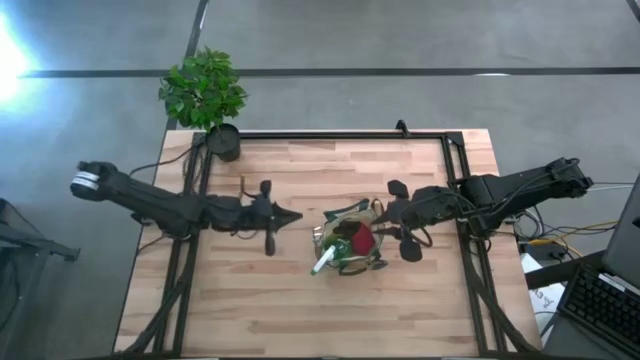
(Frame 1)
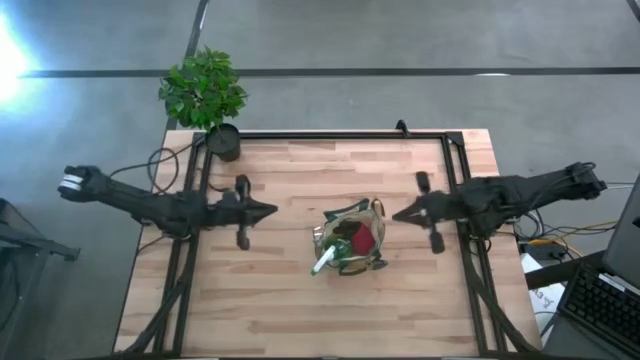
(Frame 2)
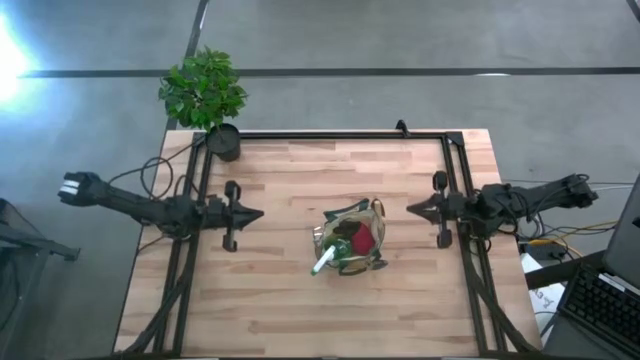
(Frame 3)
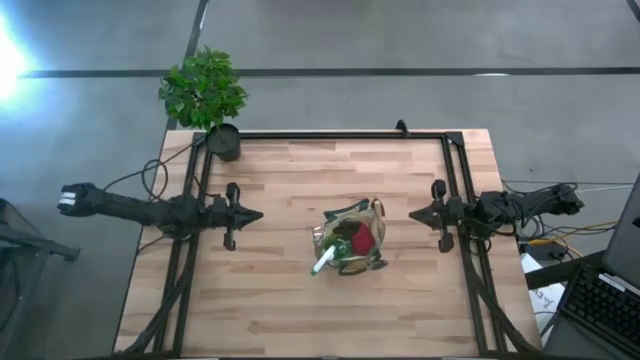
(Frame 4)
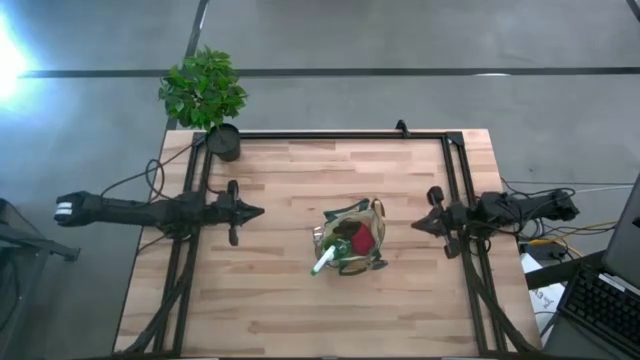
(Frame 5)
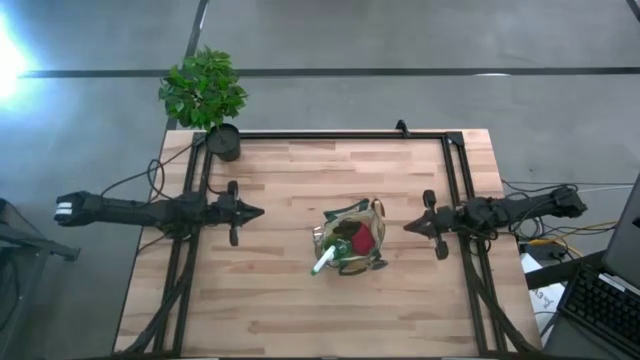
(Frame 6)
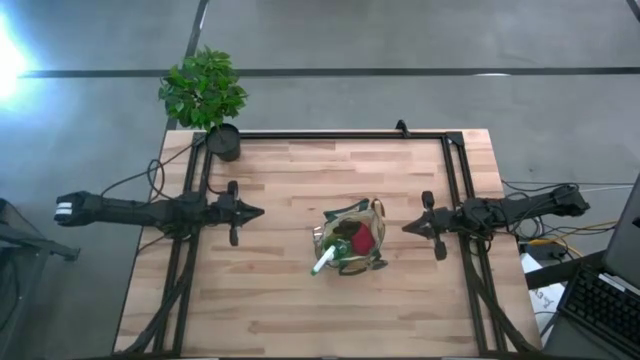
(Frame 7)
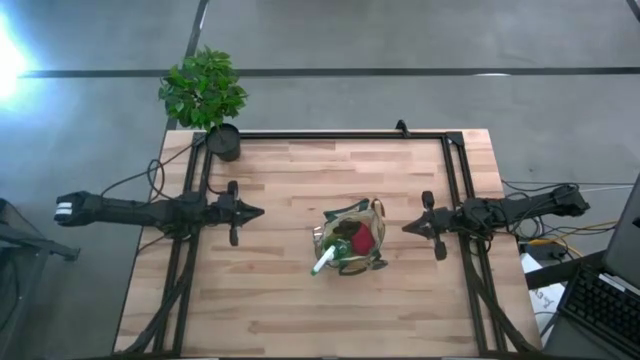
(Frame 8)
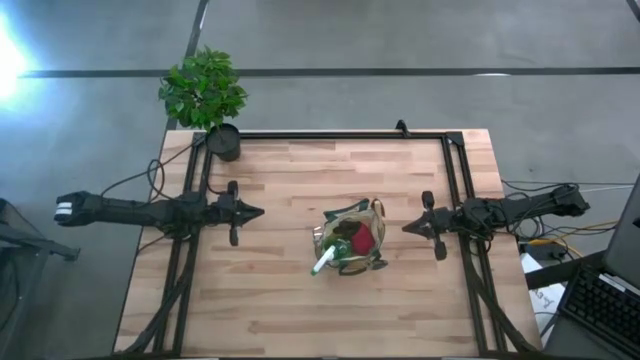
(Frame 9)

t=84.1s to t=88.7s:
Task: Pick & Place Garden tools in Gardening bag
Return to Home Position

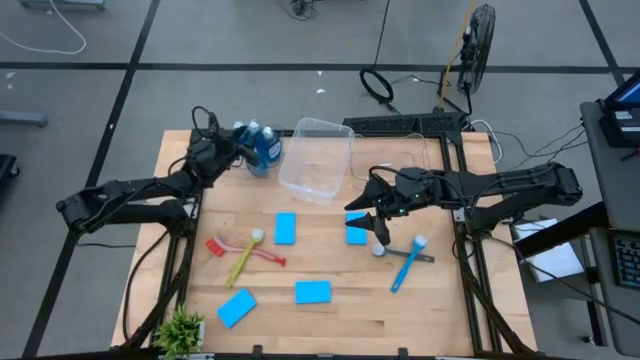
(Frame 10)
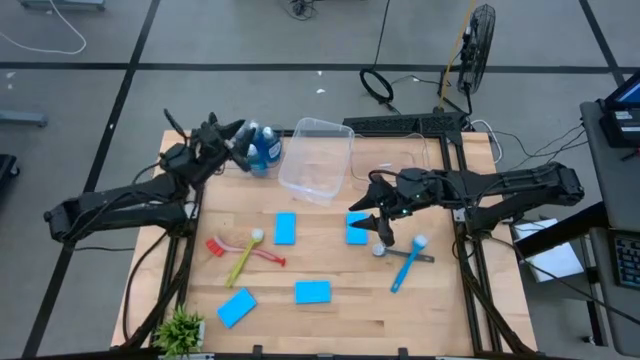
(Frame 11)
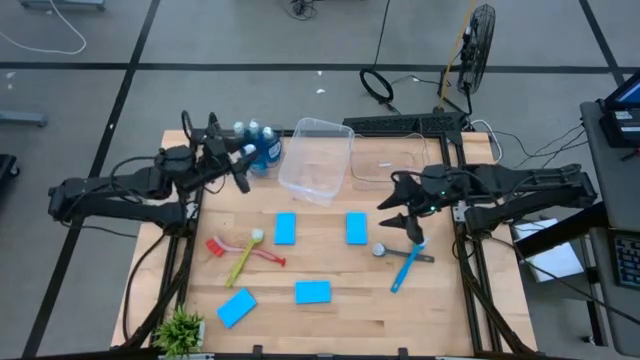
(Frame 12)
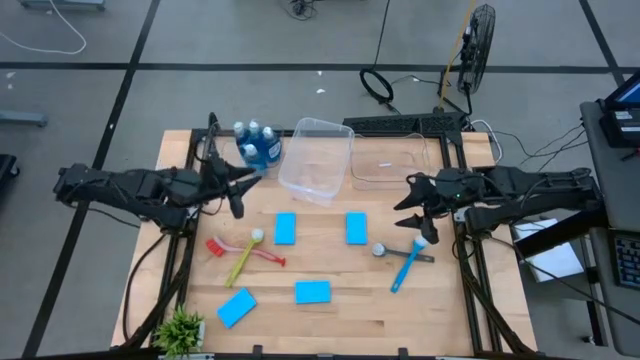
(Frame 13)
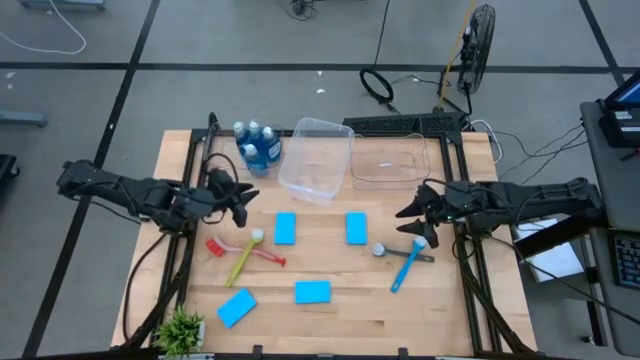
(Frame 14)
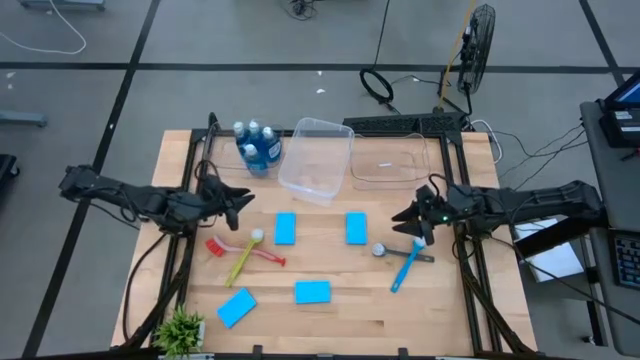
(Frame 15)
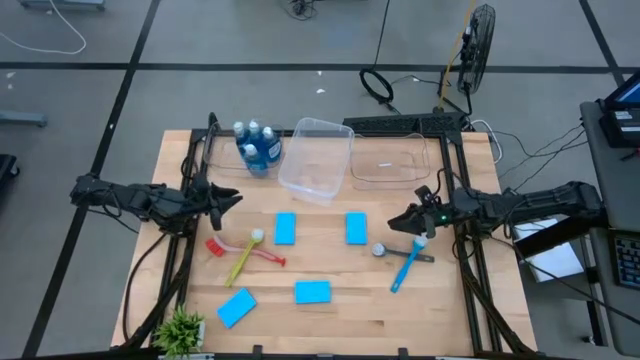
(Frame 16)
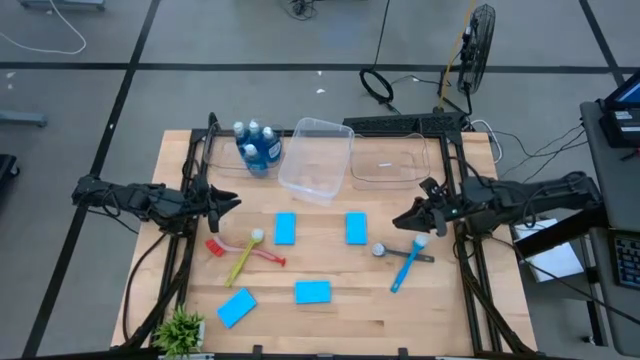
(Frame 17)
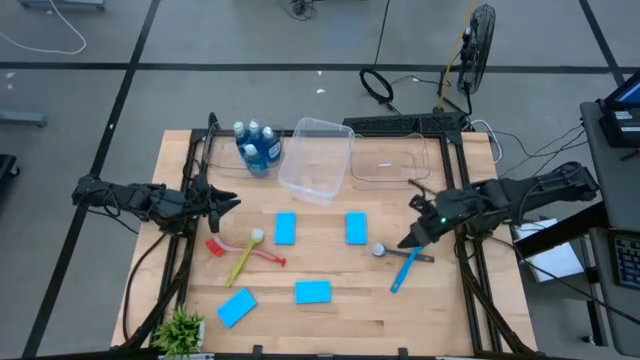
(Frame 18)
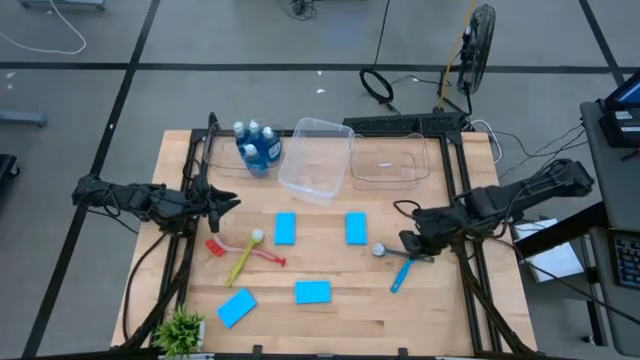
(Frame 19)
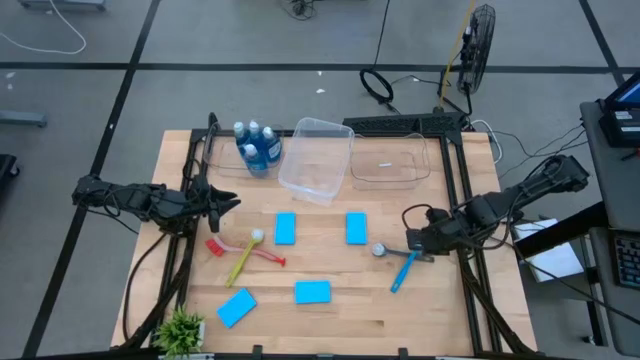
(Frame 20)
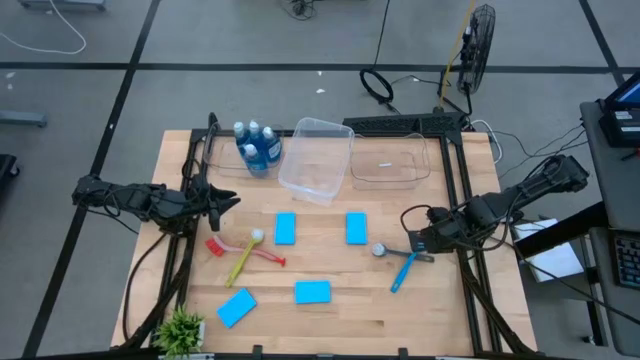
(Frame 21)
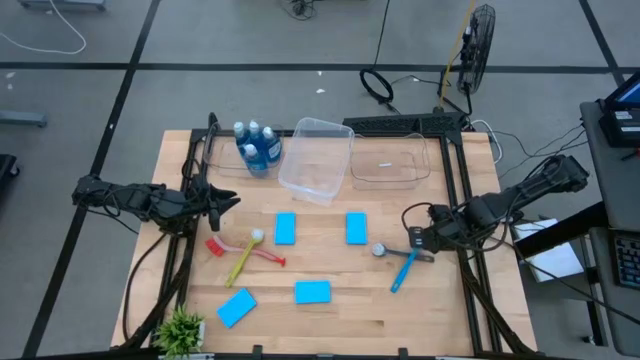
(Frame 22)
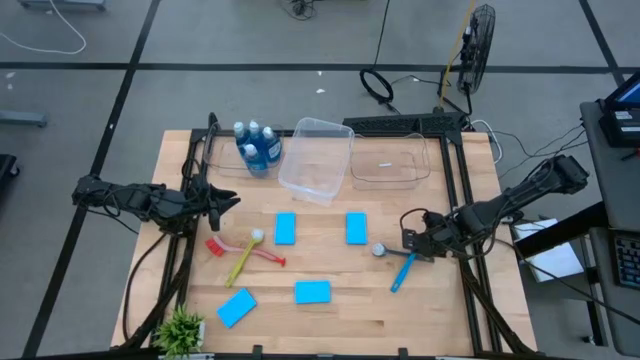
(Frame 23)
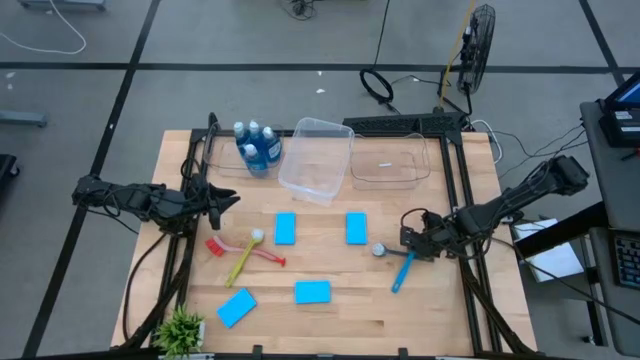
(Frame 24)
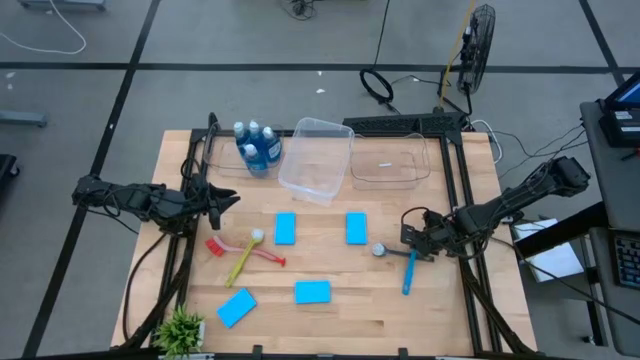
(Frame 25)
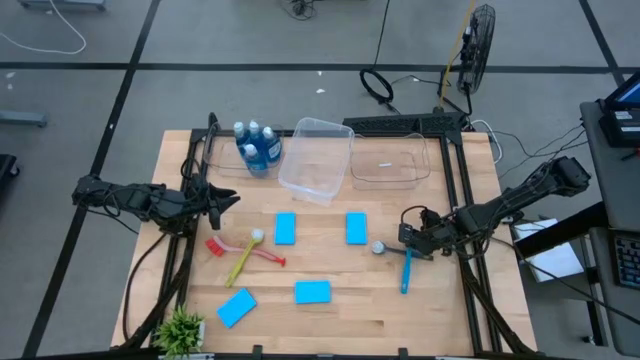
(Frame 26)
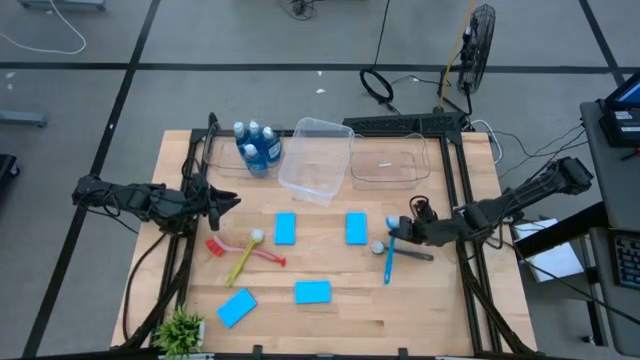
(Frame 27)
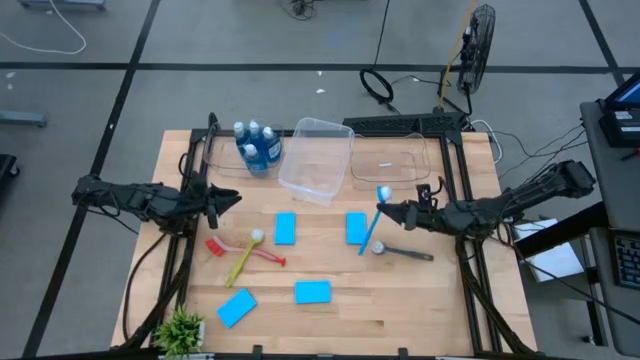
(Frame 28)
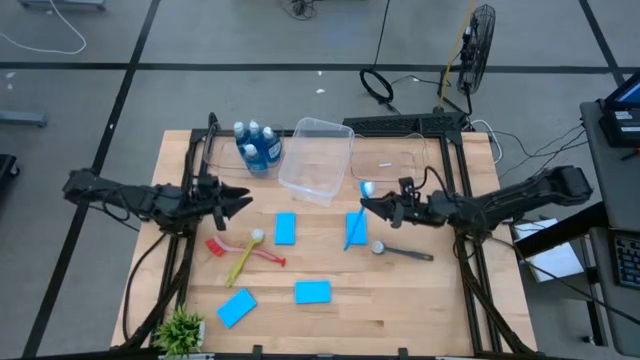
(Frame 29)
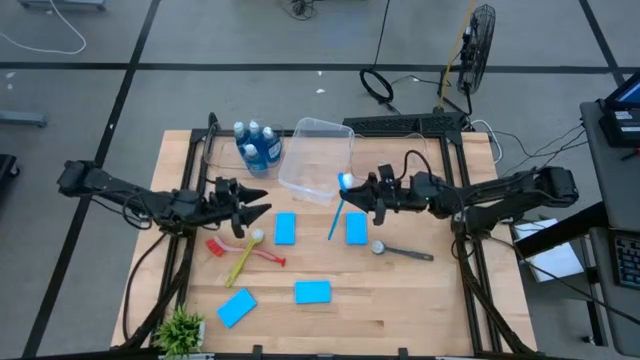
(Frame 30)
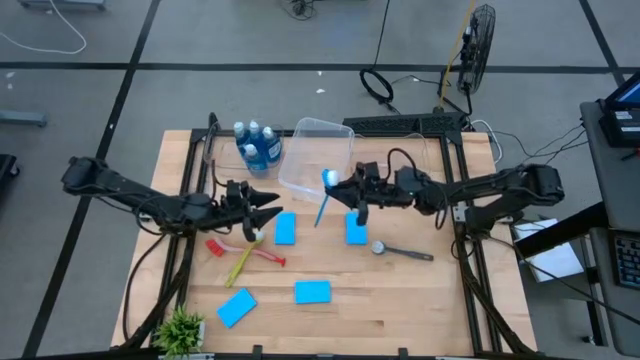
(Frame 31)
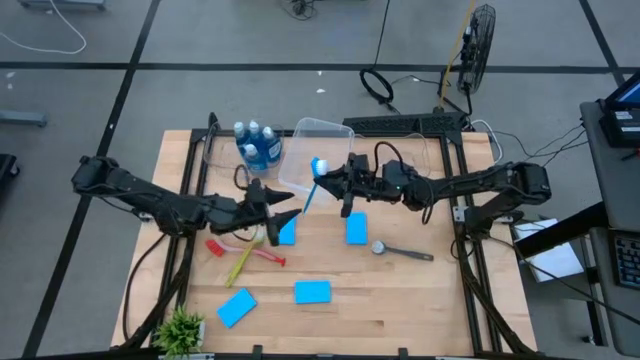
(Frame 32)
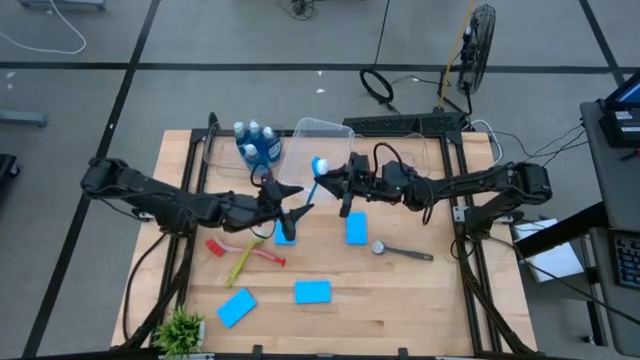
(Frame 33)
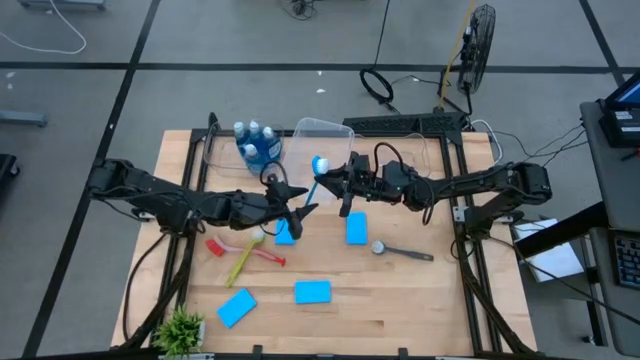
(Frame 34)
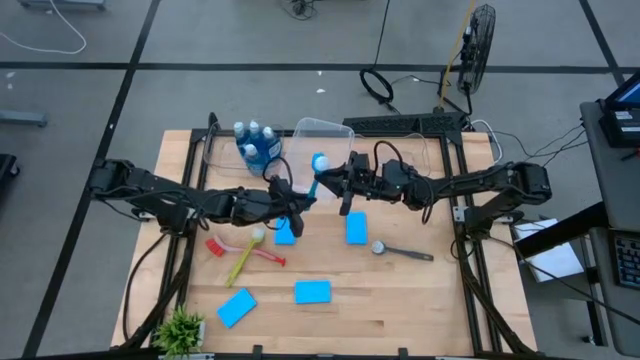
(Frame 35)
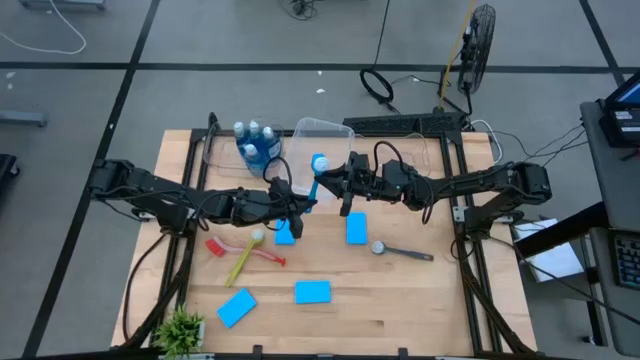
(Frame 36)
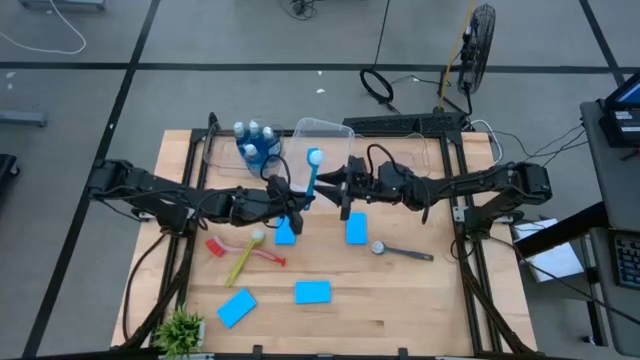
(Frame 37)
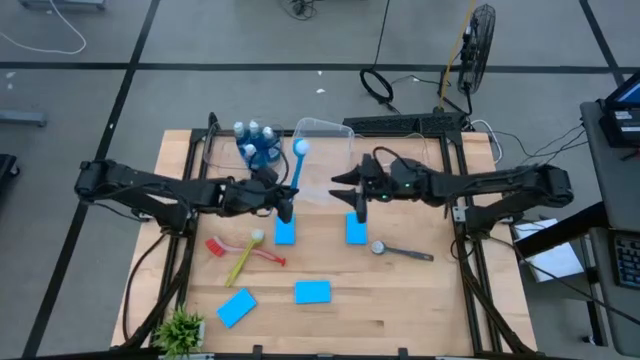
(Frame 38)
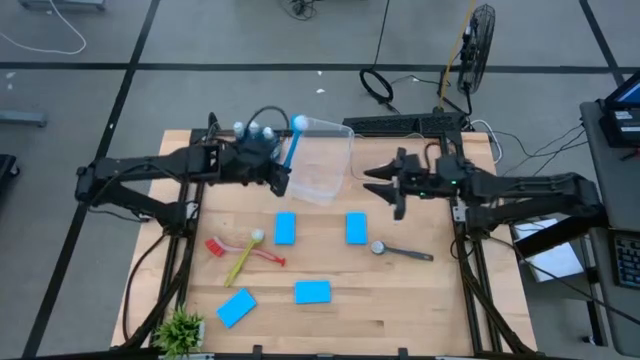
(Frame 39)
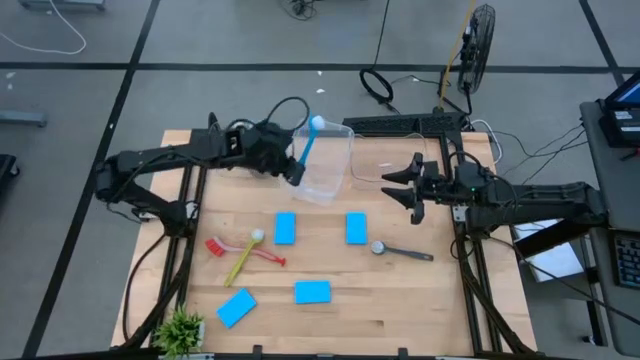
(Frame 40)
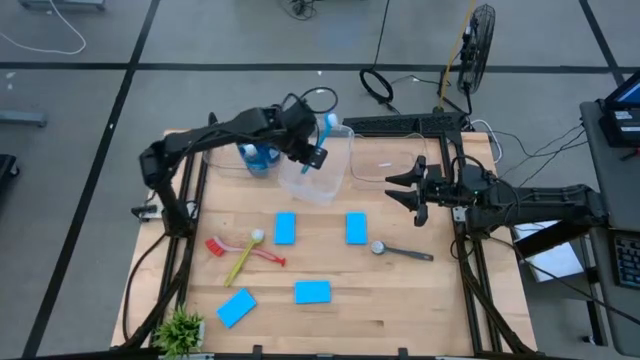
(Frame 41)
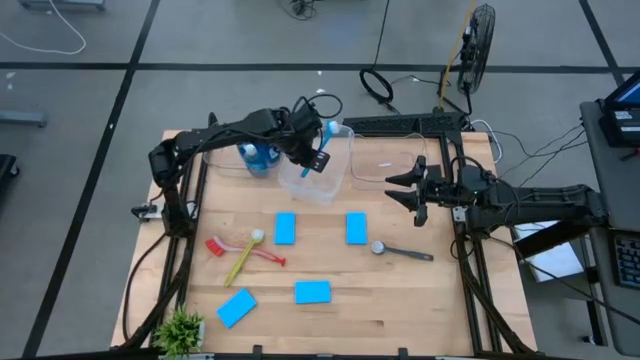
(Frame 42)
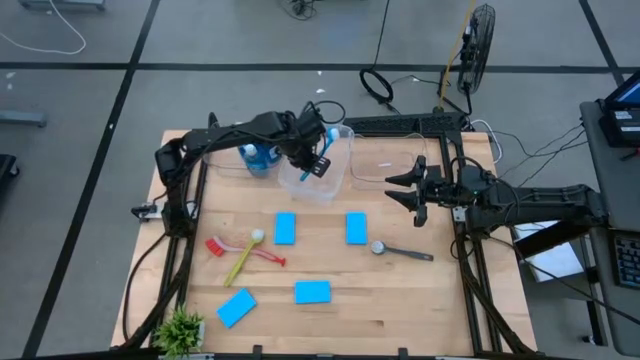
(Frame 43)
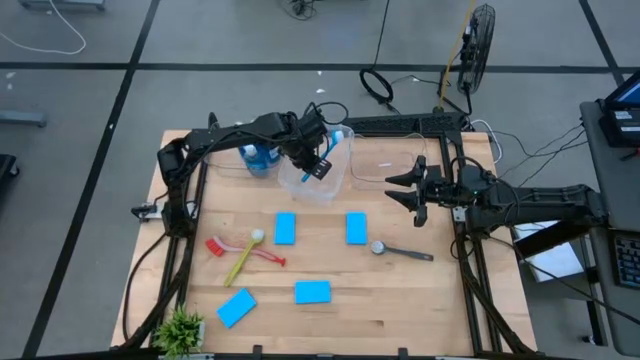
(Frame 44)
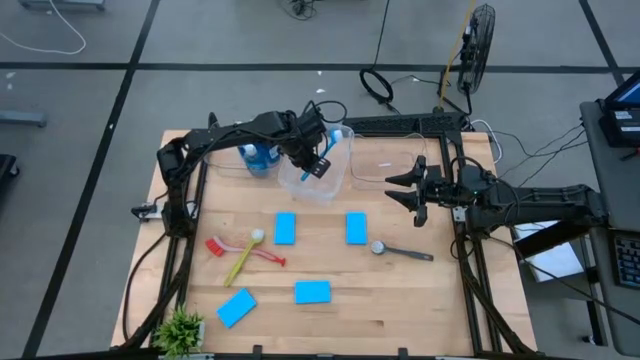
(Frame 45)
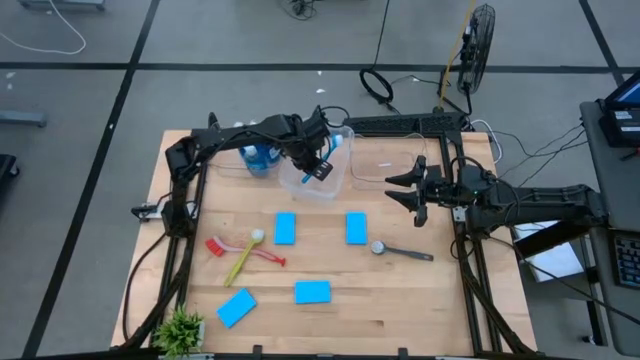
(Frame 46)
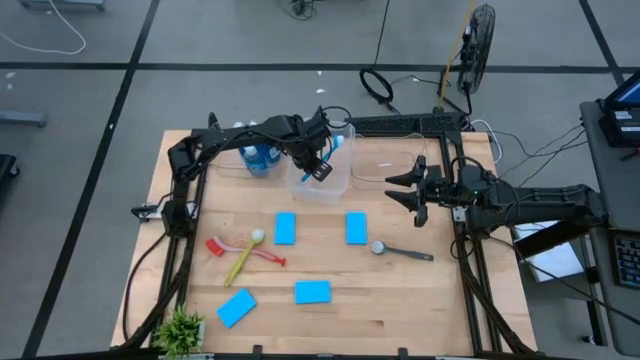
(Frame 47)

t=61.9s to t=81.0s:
Task: Pick & Place Kitchen Sink Supplies
Put the blue dish brush into the transparent container
